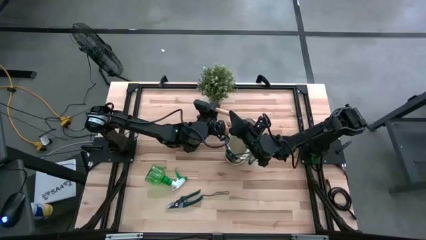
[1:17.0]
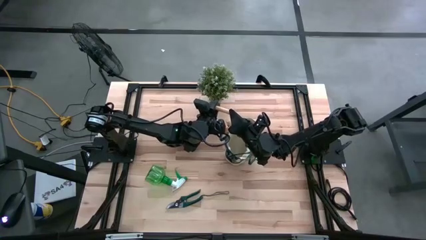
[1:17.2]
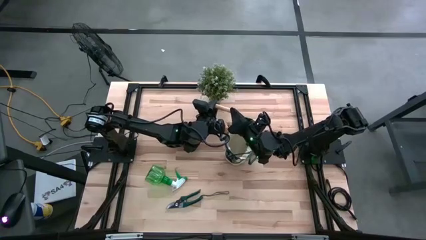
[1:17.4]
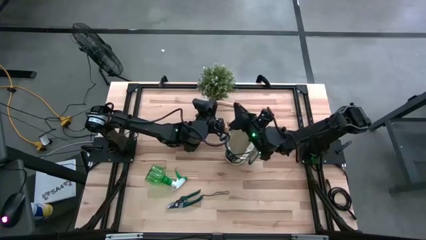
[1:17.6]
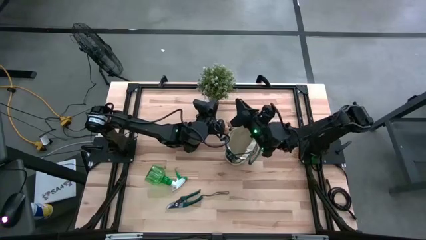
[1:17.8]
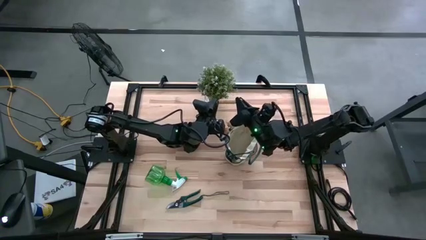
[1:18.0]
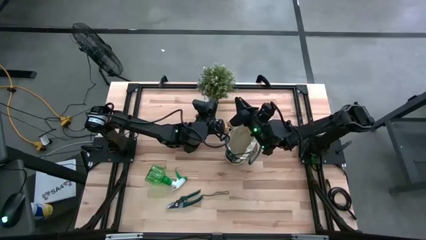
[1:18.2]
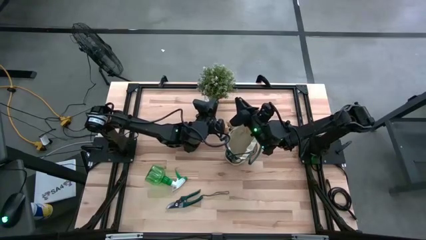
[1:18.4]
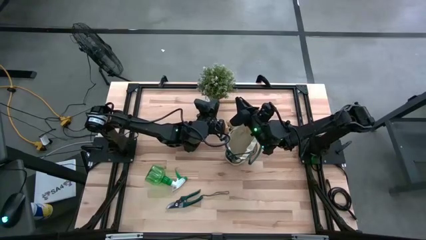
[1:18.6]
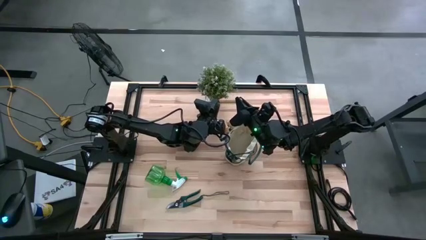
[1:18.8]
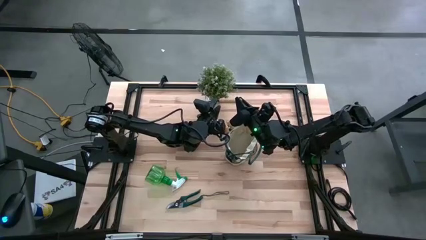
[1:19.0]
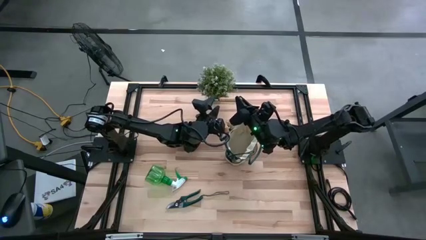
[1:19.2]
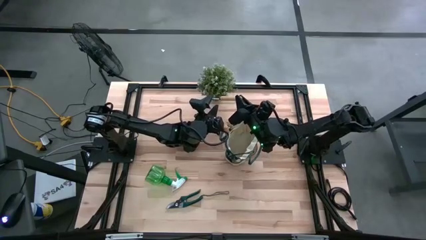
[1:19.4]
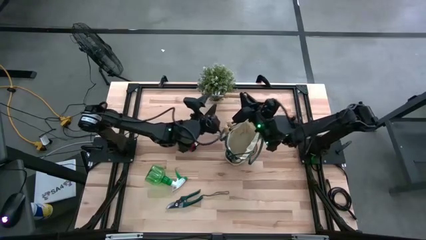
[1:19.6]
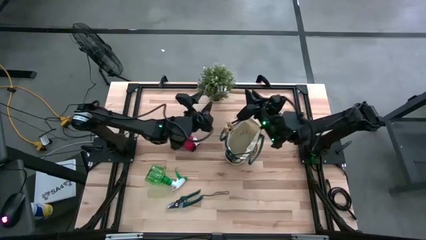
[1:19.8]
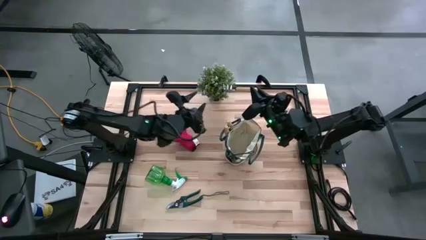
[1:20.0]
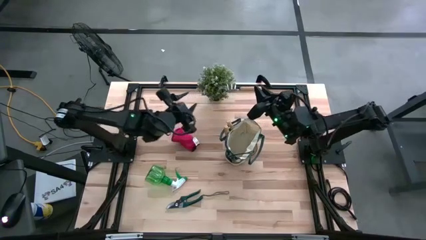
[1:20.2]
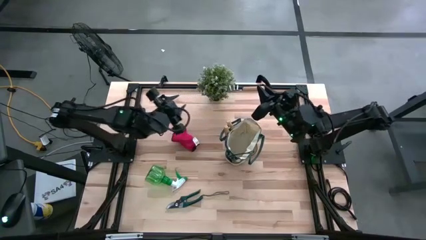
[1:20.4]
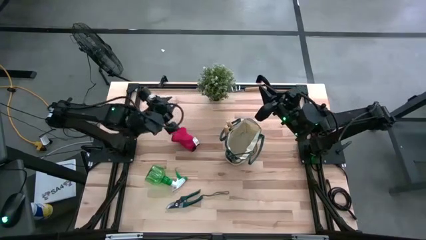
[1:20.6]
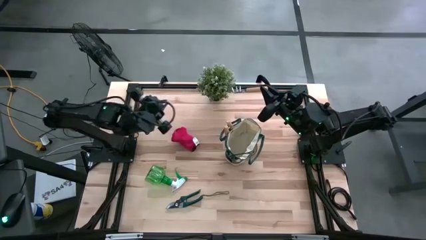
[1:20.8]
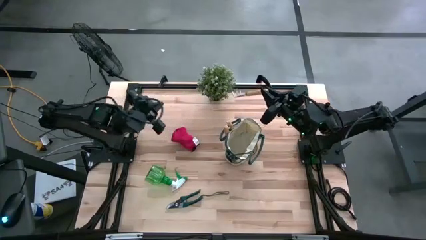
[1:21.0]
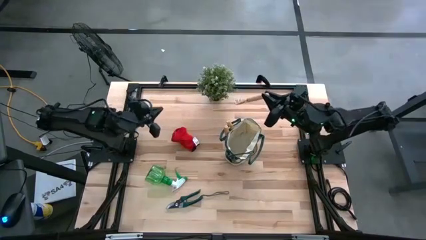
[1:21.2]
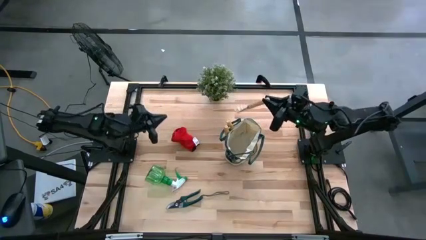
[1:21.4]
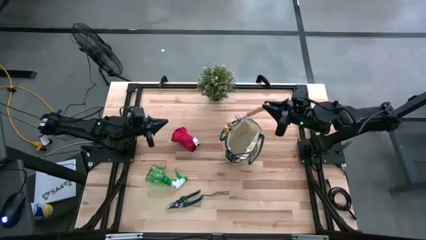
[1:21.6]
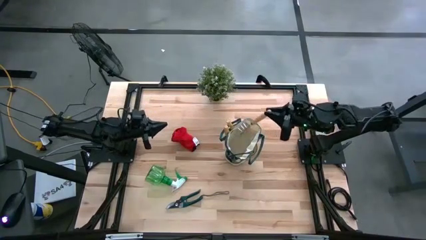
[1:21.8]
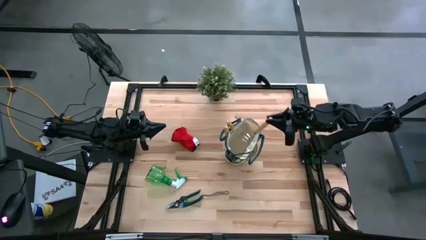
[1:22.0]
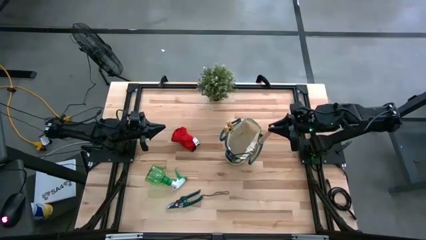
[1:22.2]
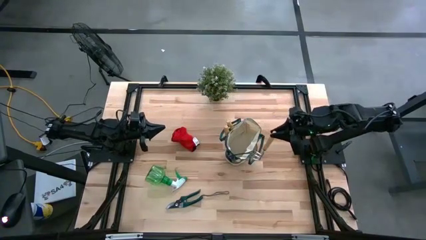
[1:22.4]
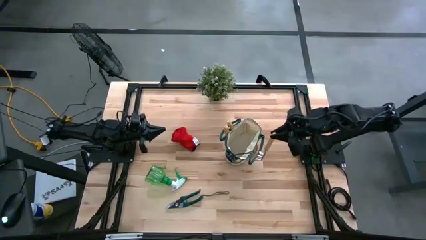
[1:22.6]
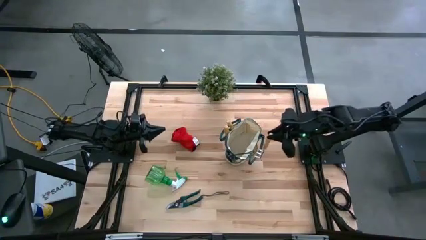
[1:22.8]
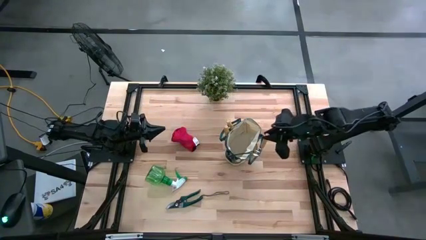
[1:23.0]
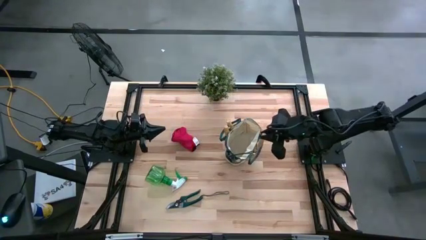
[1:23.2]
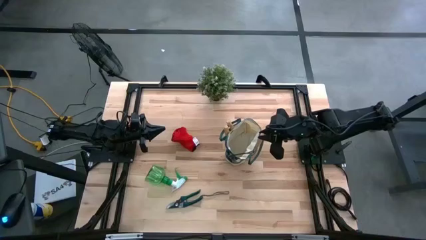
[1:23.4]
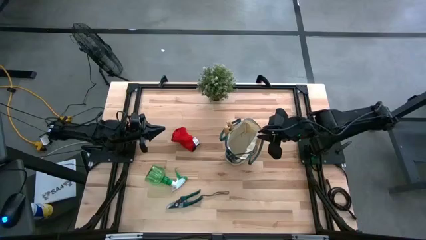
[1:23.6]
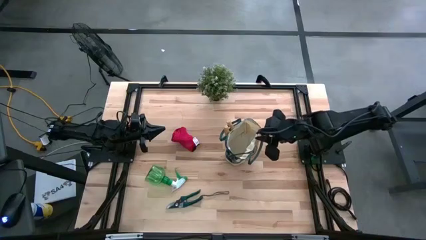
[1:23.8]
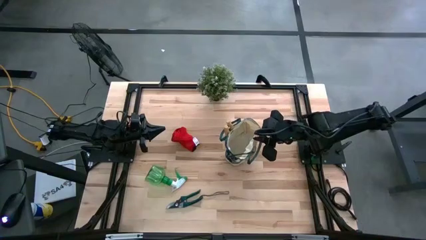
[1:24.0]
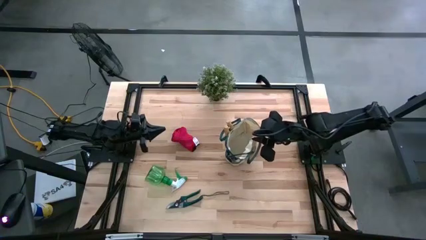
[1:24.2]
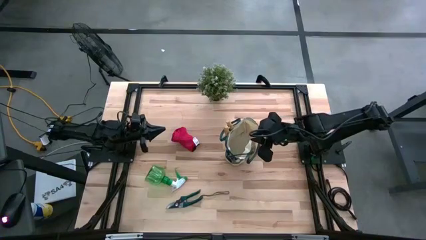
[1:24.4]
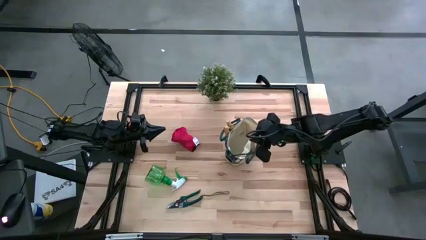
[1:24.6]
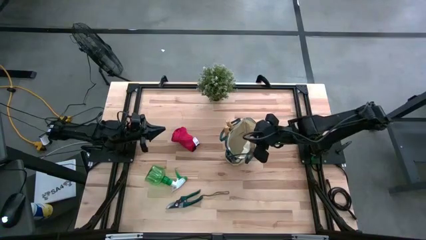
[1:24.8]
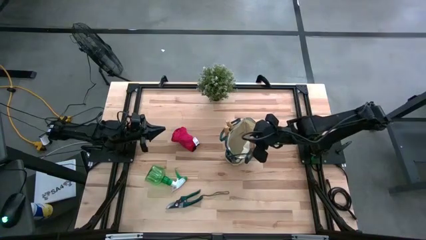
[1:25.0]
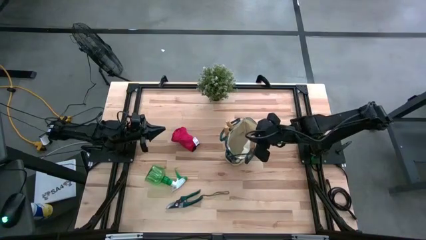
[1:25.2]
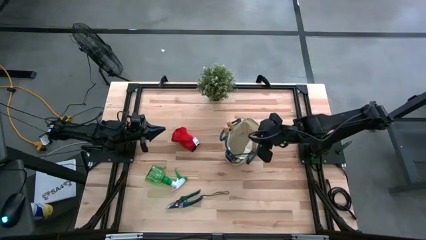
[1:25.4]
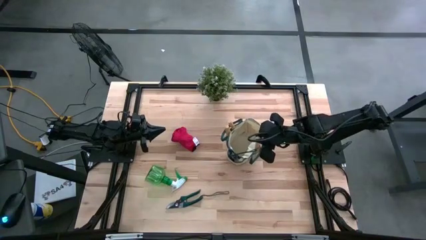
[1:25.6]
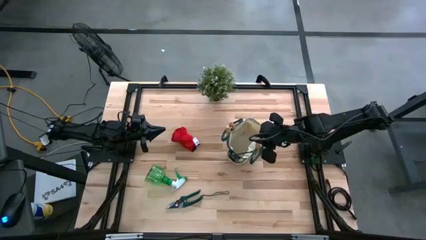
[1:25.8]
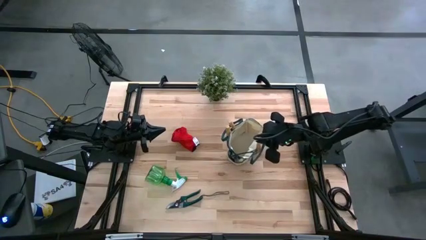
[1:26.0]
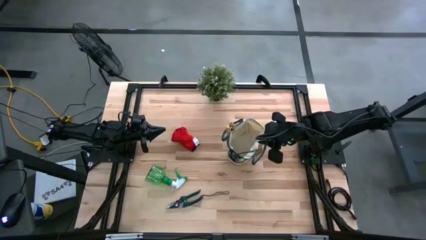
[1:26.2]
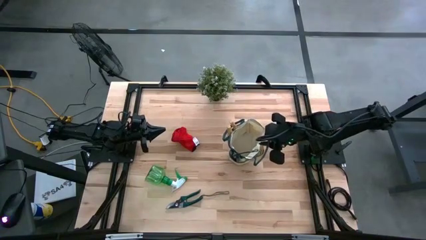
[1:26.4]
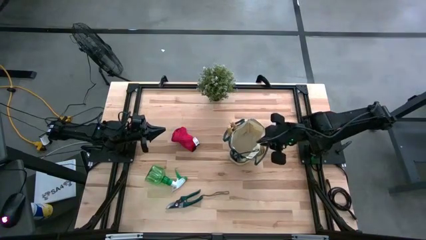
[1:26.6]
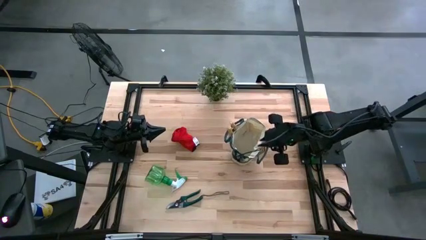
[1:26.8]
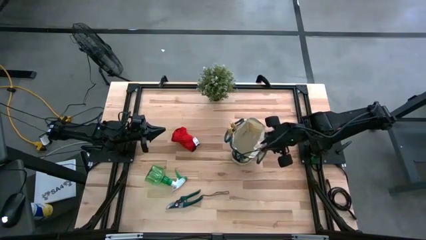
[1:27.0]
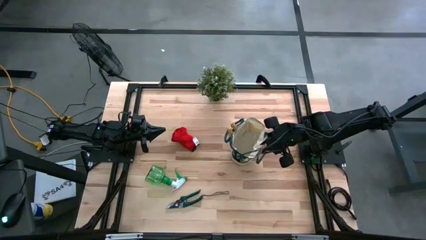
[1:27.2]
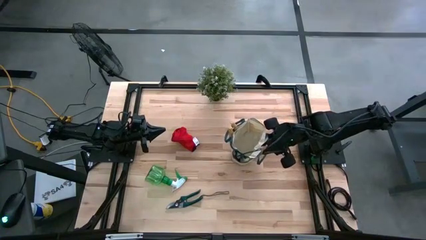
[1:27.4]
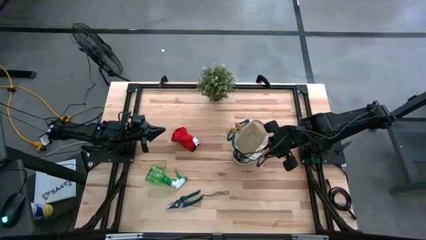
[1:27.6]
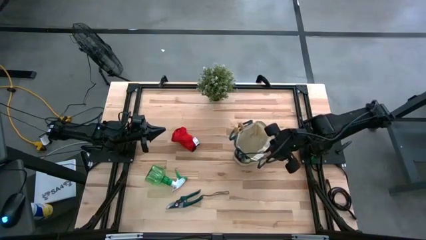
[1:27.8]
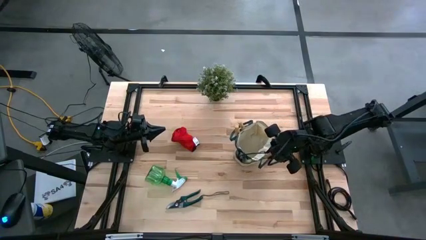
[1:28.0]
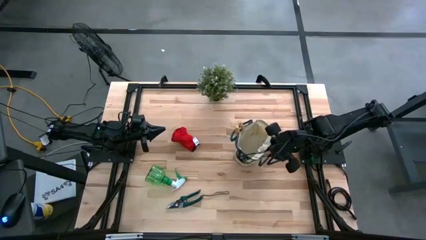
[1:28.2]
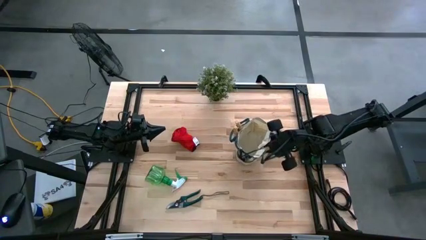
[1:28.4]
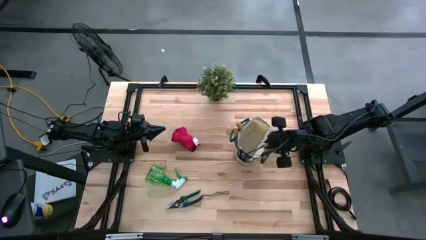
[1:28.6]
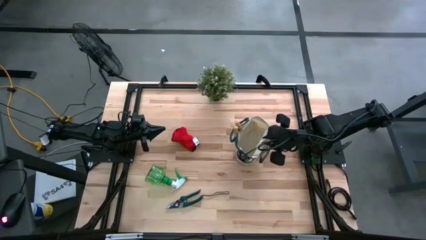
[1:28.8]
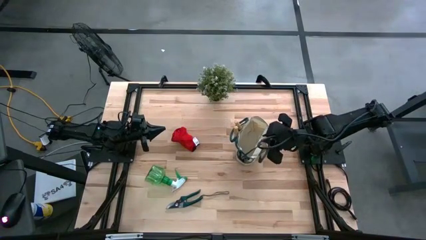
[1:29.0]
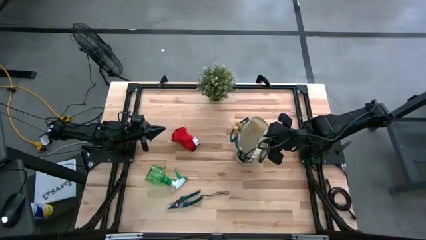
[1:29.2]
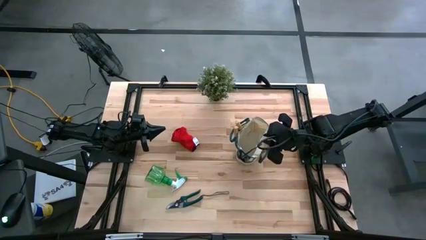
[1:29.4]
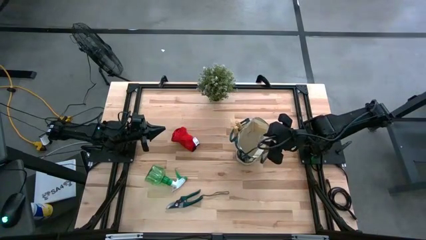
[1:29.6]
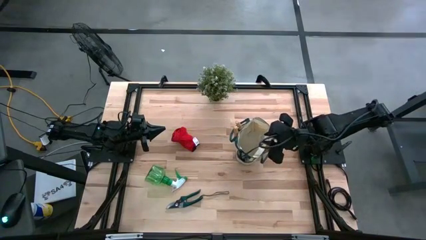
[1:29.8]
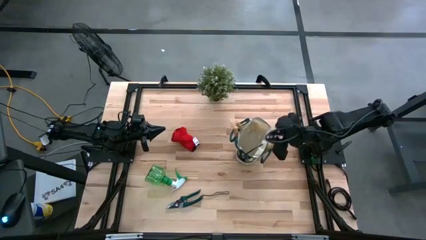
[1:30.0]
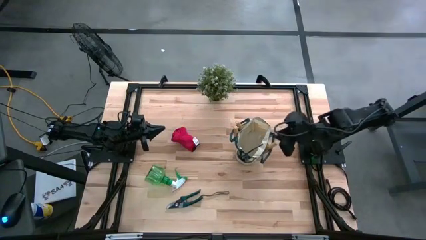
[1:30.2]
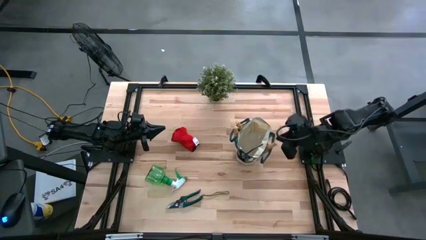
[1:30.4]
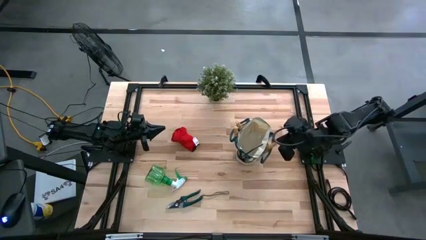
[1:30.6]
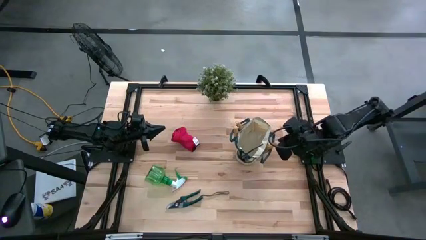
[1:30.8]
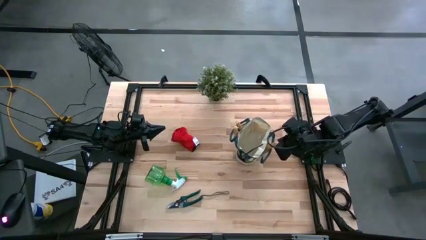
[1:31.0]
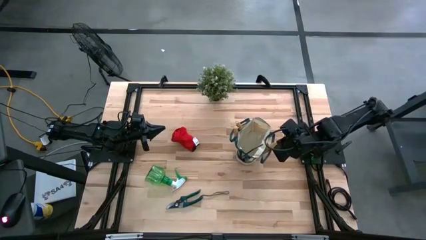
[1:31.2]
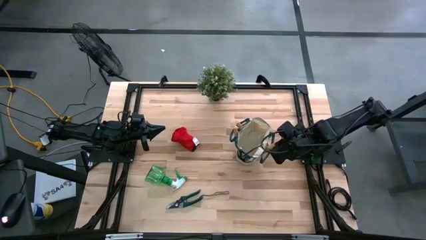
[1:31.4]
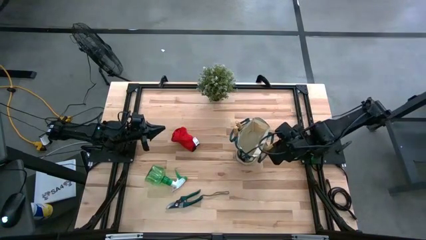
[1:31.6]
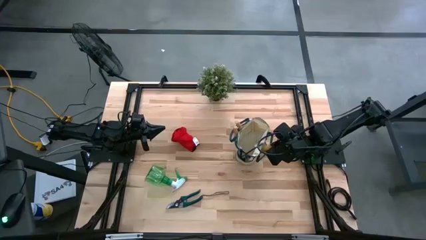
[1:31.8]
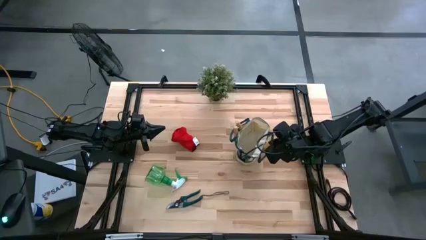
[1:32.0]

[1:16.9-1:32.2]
Task: Pick & Place Garden tools in Gardening bag
Put the hand rake into the gardening bag

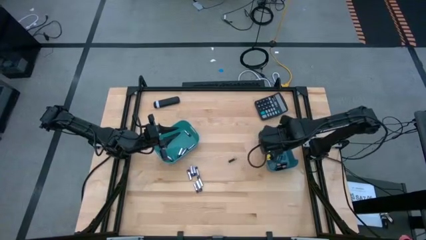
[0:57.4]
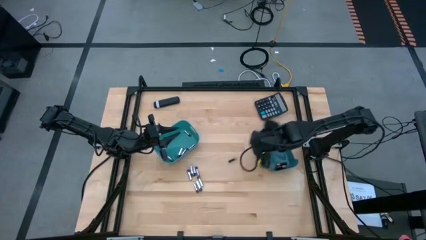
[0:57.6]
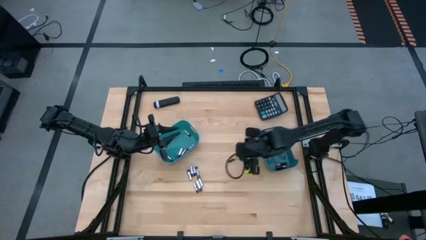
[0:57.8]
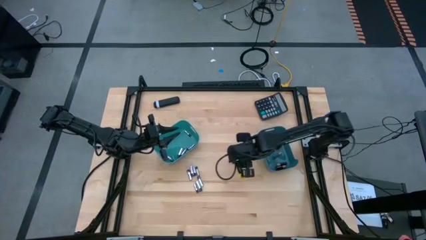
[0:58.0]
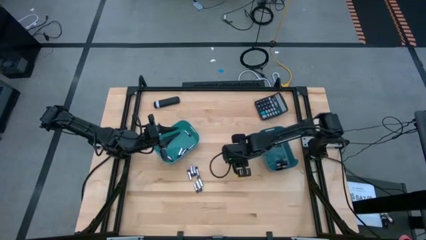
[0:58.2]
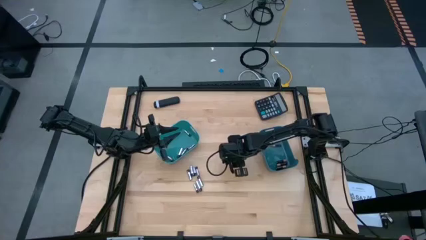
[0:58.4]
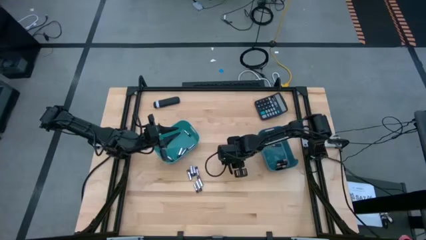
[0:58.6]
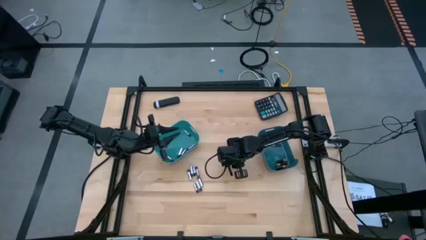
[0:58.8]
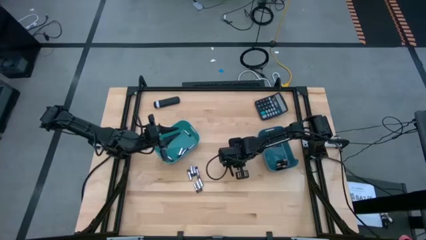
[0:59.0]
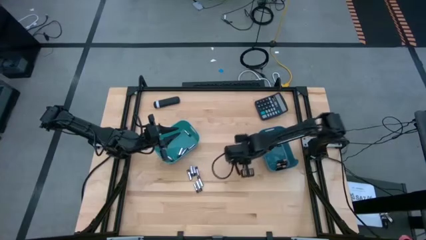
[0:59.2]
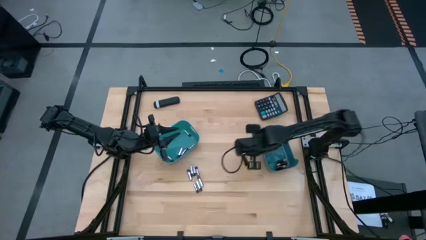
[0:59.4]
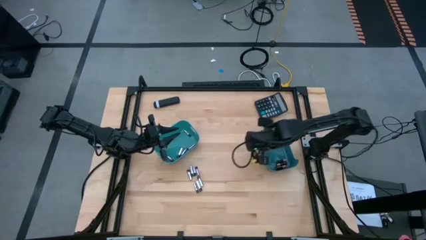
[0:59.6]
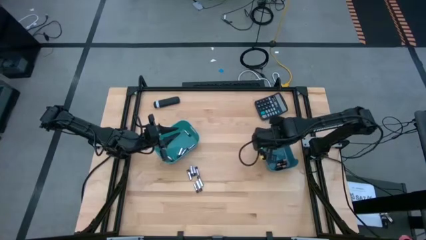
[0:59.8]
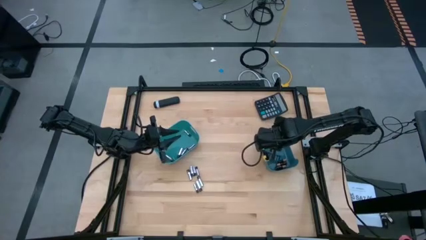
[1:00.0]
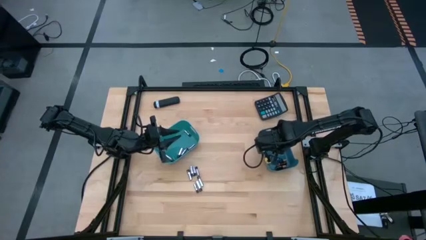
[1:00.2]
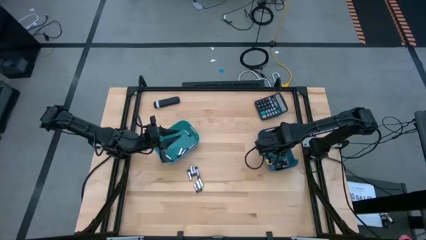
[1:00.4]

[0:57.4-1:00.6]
Task: Sort batteries
Put the black battery into the blue bin
